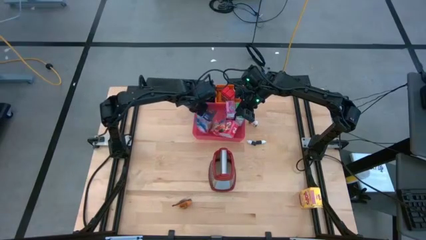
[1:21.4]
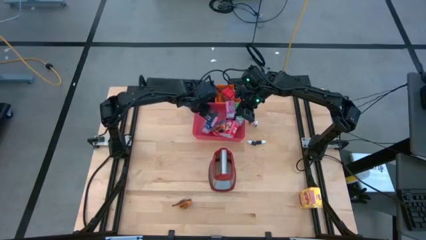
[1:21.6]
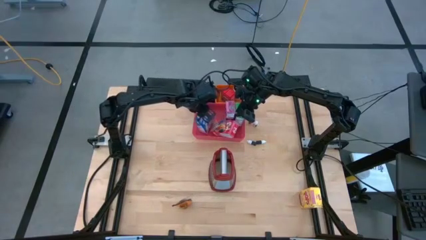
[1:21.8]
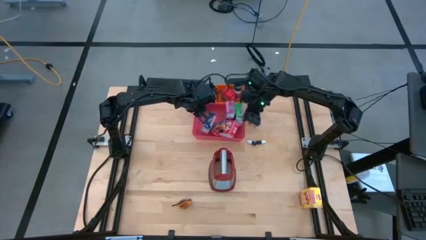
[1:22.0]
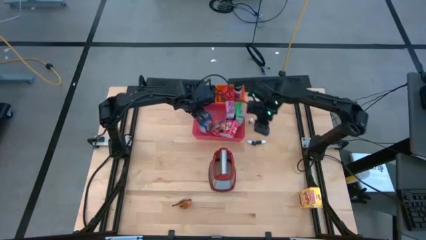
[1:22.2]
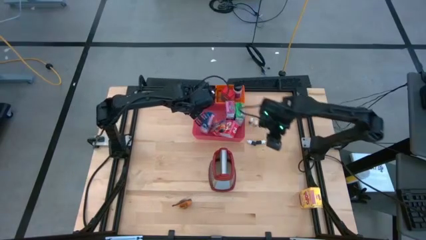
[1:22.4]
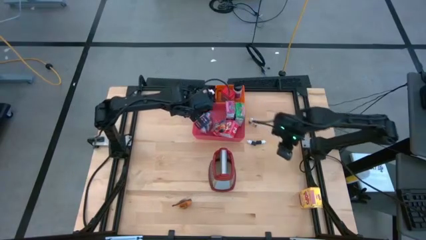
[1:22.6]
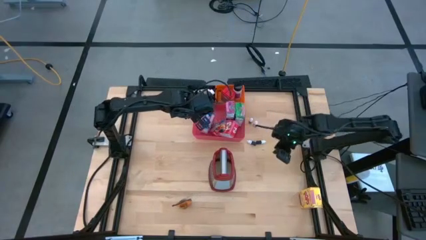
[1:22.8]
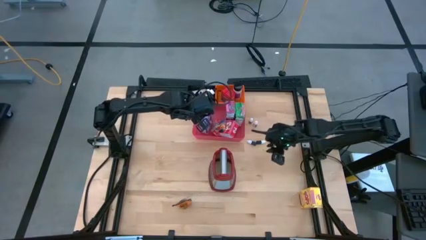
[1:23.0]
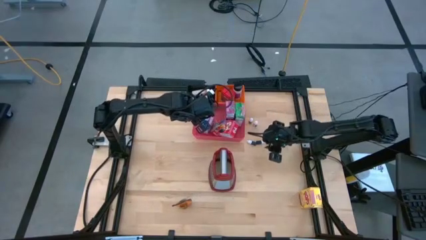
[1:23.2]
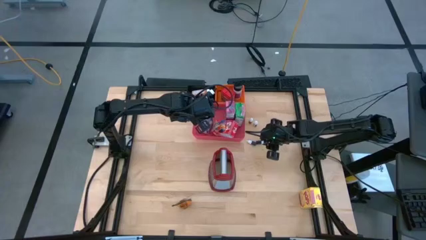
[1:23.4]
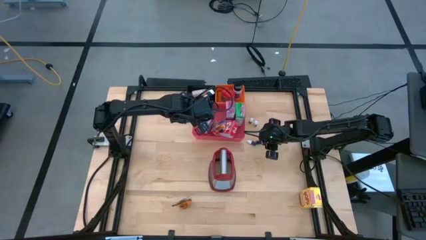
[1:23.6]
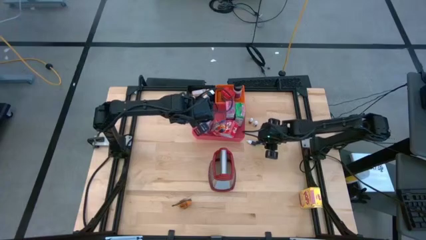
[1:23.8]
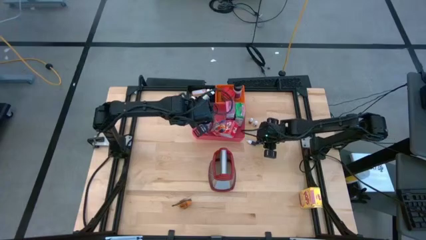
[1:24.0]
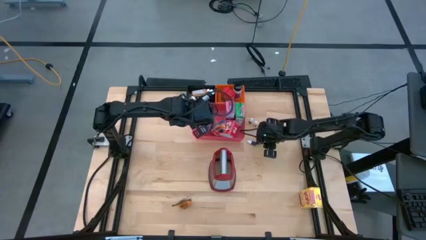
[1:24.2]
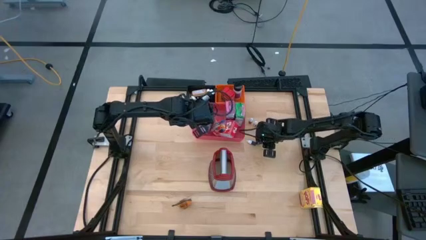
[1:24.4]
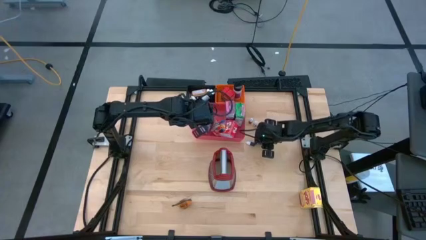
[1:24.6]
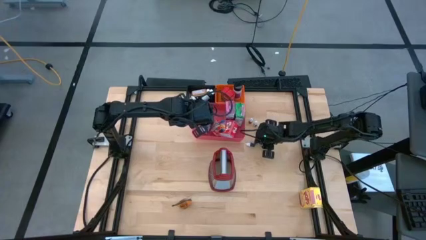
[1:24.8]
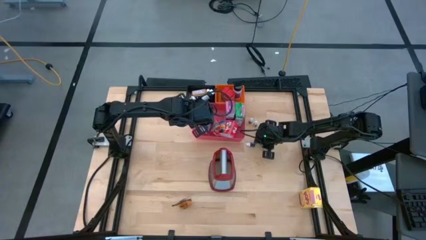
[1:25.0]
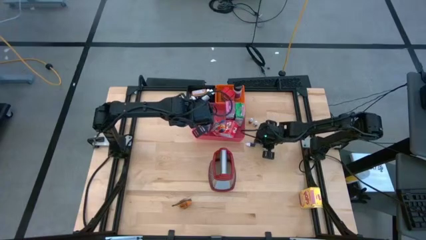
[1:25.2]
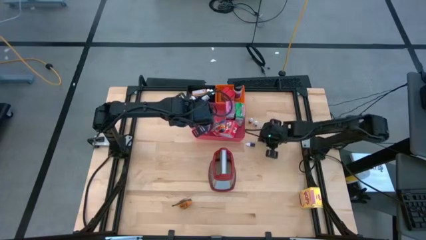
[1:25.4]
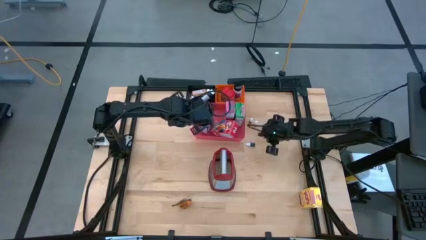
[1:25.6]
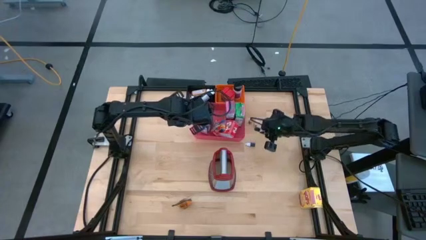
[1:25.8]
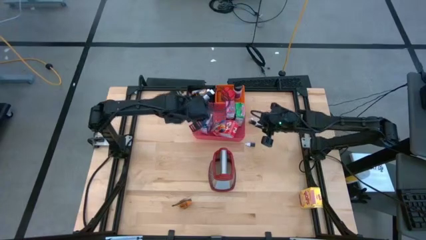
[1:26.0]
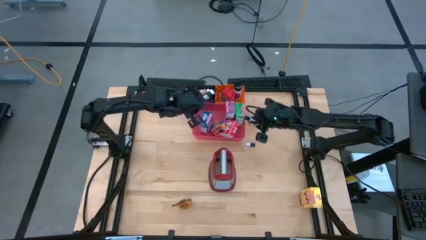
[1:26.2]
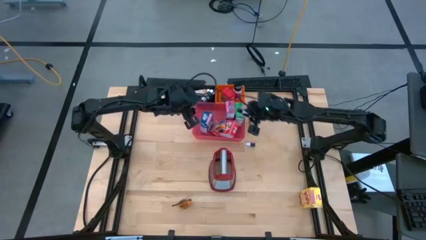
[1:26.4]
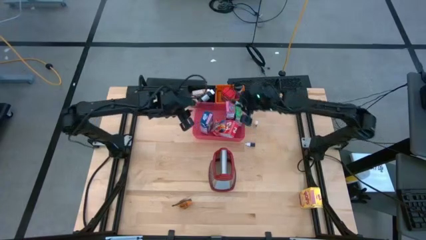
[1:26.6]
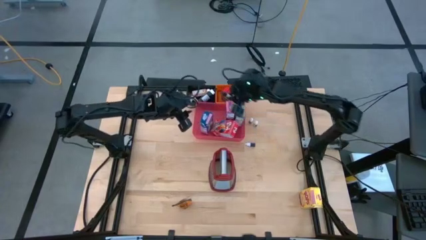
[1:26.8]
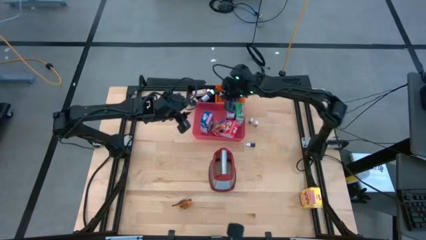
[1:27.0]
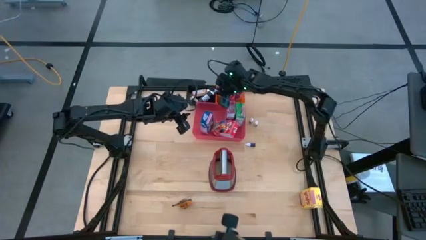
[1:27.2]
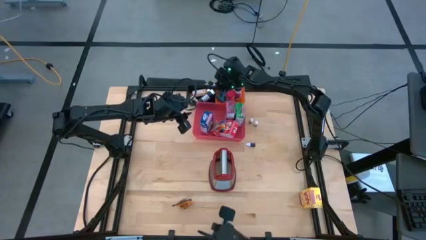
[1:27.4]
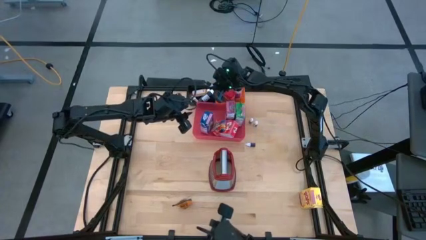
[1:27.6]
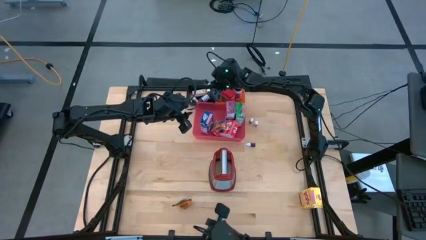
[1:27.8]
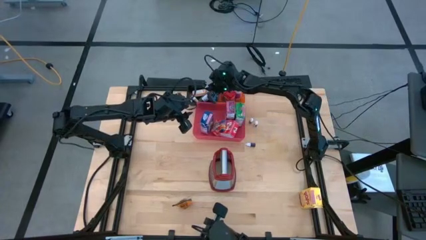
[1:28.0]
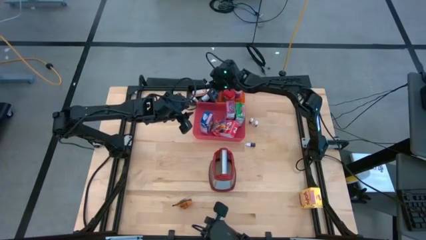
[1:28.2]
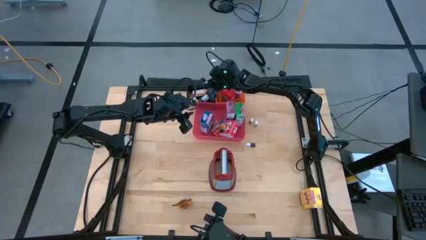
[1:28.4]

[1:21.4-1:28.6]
Task: Pick & Place Kitchen Items
Put the small green food coloring bottle into black basket

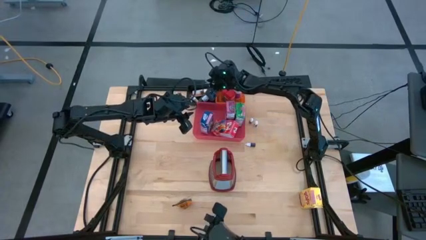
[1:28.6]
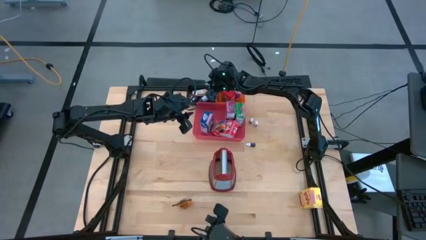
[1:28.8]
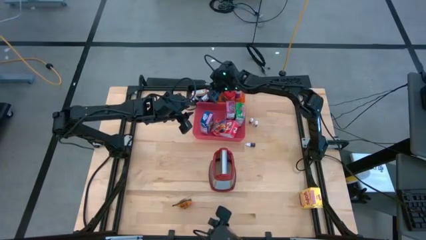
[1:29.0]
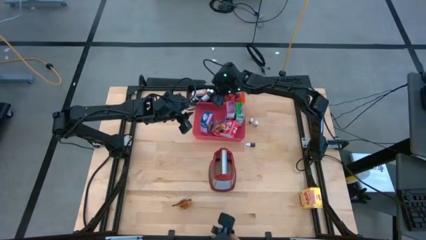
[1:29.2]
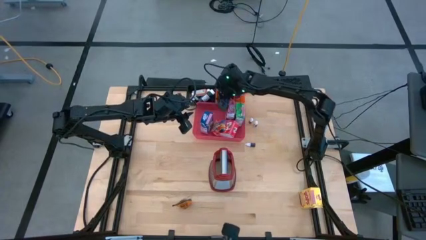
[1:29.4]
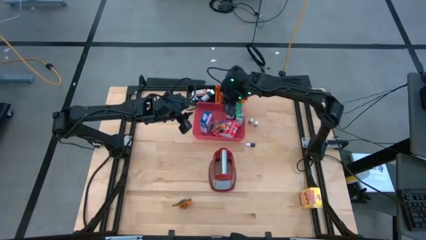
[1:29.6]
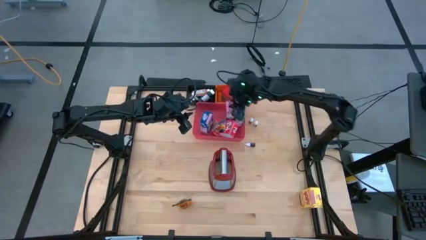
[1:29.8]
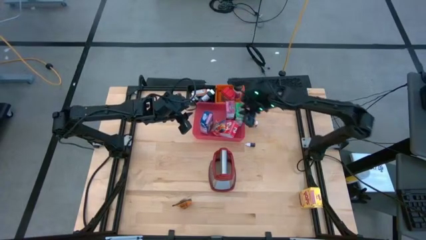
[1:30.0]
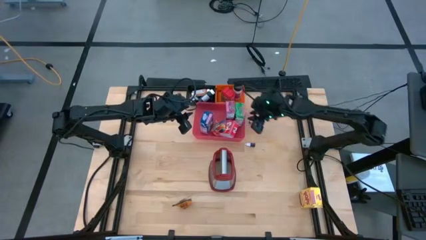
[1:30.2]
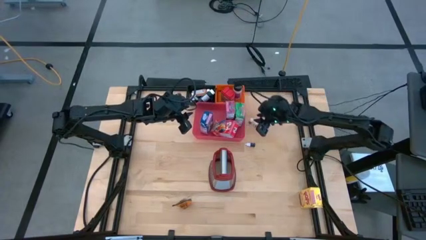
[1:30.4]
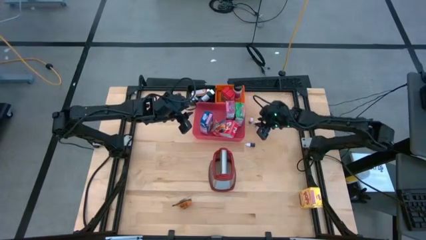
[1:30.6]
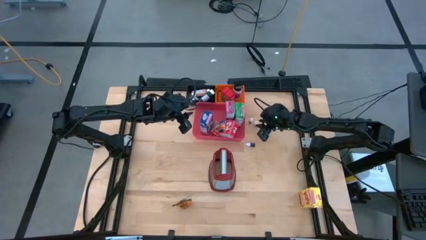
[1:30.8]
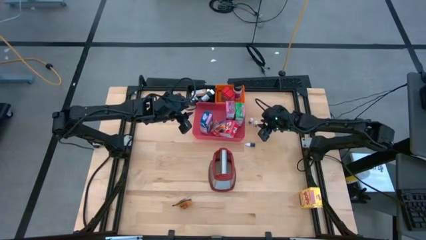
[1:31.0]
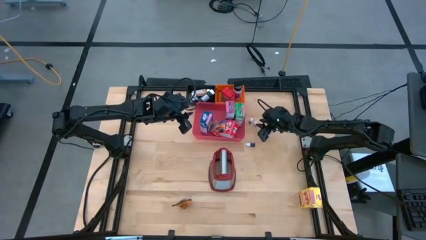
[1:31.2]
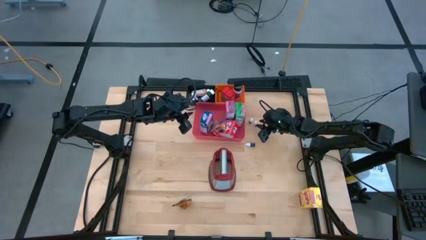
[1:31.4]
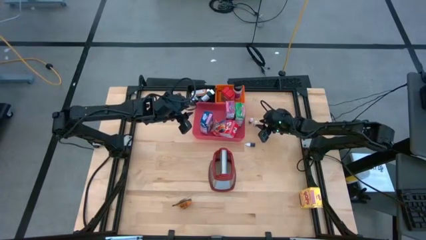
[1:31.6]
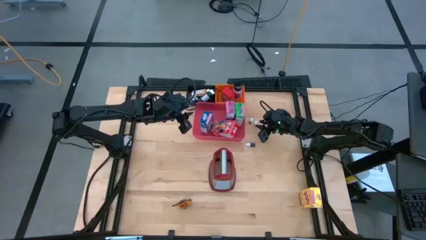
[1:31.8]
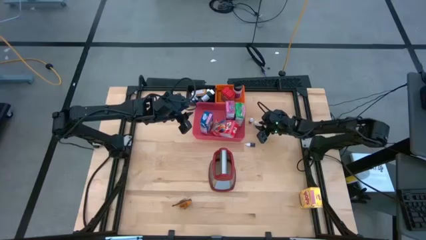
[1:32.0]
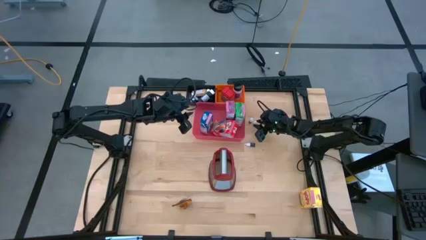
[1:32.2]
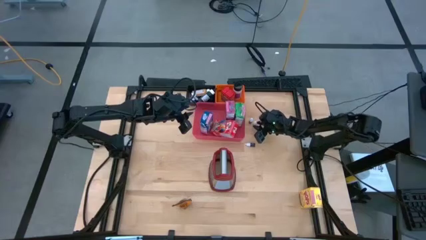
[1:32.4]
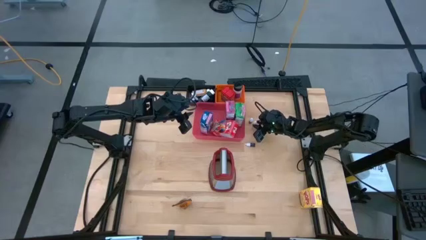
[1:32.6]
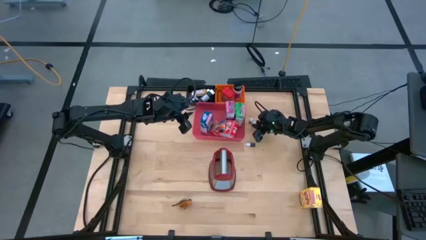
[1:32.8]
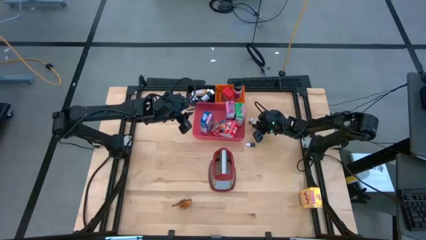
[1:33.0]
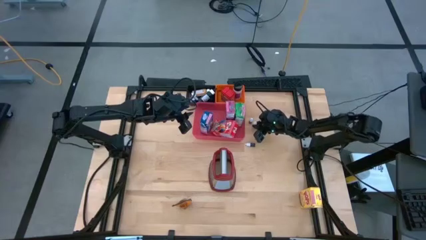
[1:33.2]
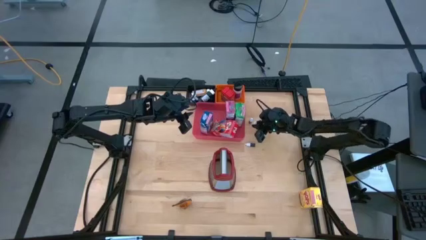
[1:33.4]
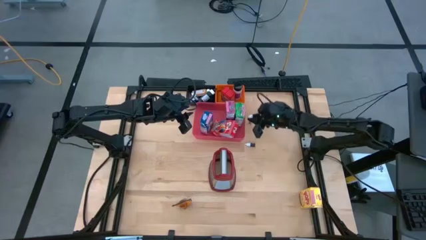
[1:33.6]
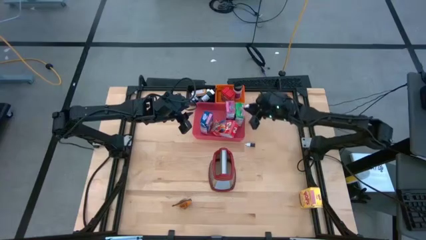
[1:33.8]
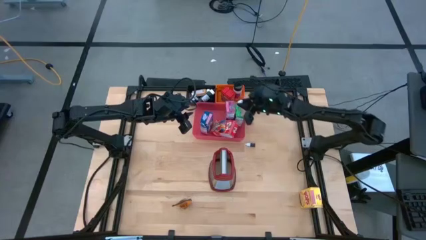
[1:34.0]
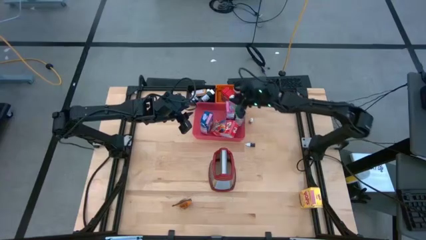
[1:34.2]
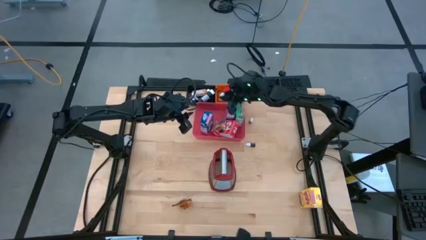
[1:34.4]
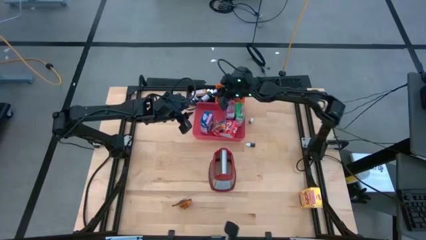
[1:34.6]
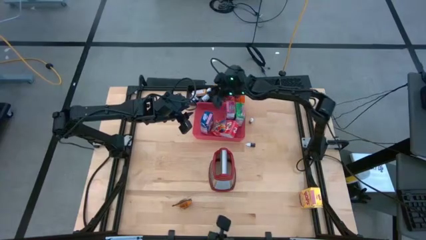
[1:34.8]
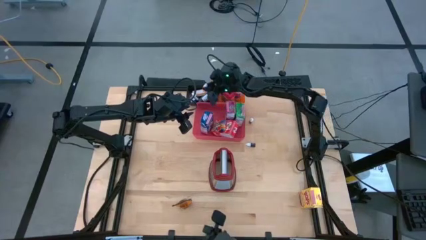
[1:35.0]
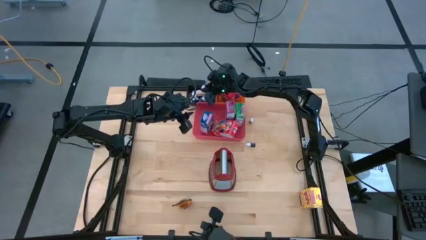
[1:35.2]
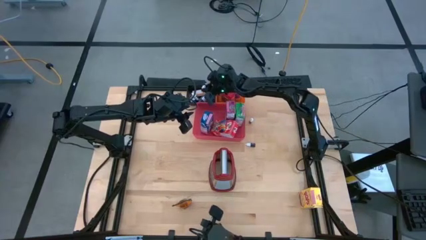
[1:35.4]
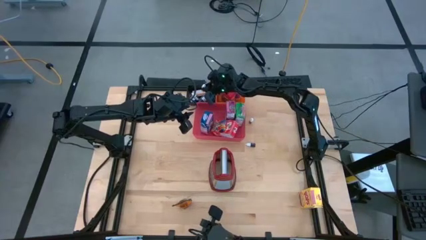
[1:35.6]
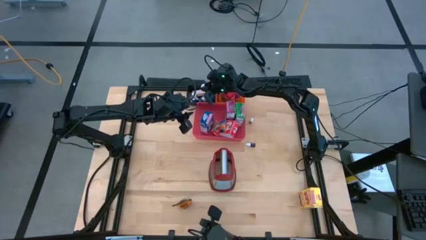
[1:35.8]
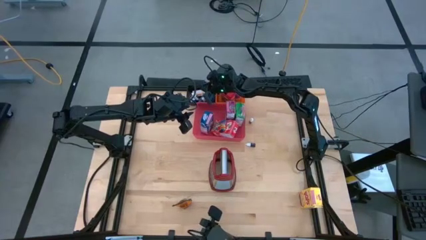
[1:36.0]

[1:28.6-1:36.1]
Put the small orange food coloring bottle into black basket

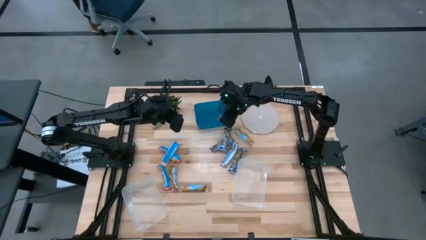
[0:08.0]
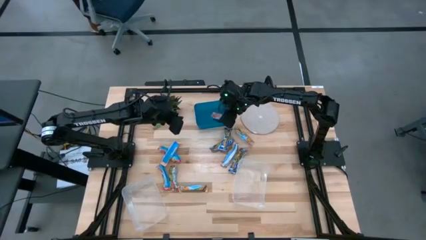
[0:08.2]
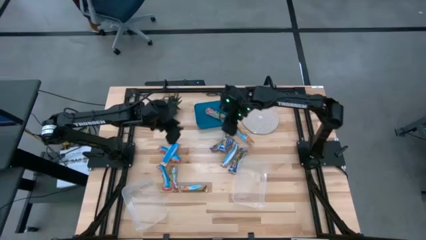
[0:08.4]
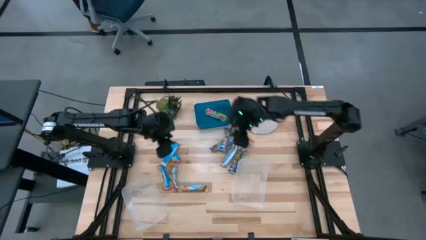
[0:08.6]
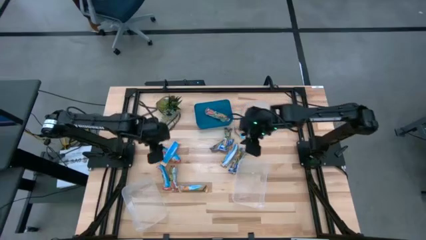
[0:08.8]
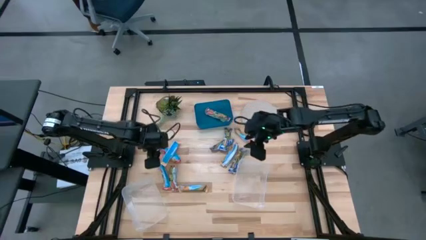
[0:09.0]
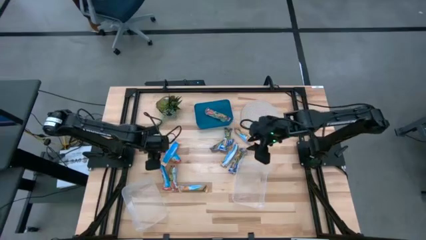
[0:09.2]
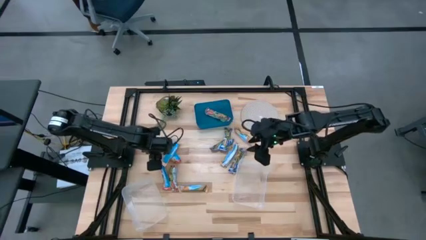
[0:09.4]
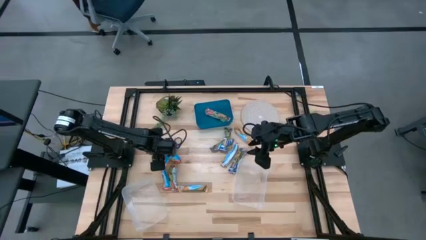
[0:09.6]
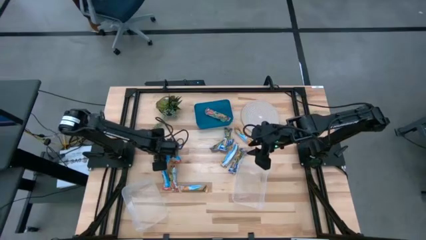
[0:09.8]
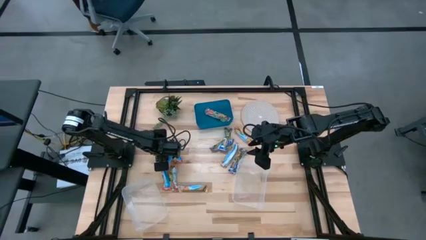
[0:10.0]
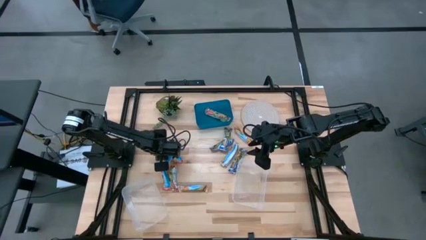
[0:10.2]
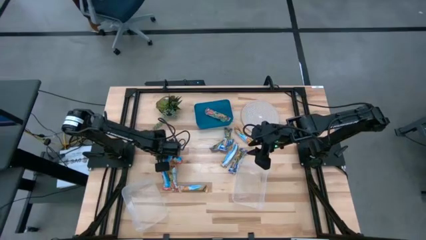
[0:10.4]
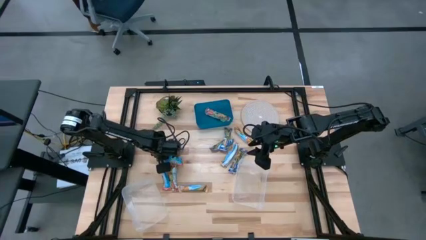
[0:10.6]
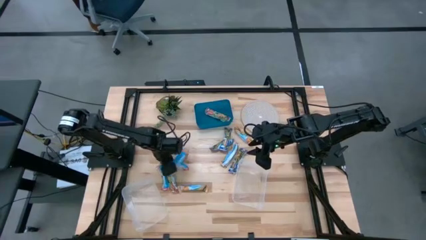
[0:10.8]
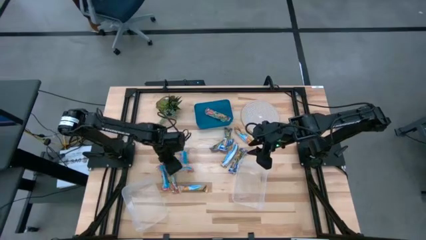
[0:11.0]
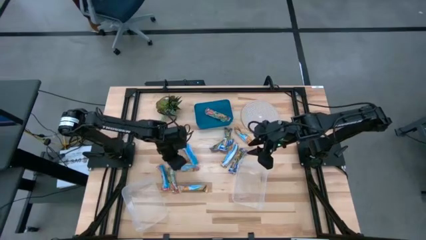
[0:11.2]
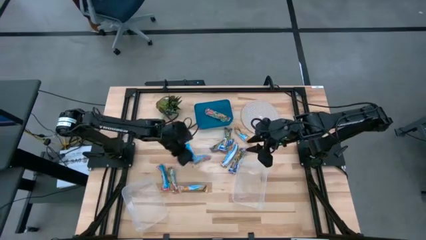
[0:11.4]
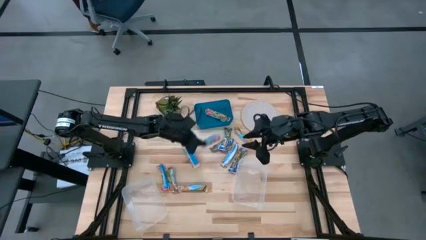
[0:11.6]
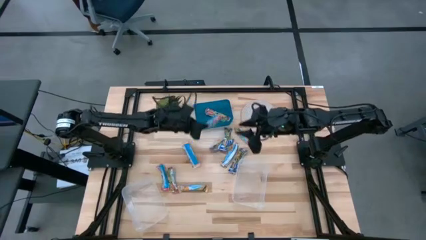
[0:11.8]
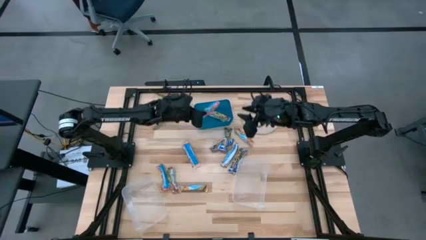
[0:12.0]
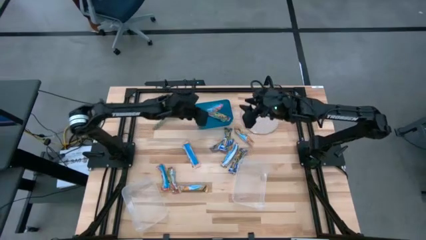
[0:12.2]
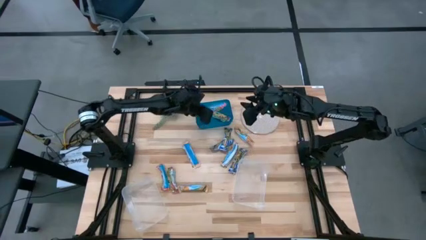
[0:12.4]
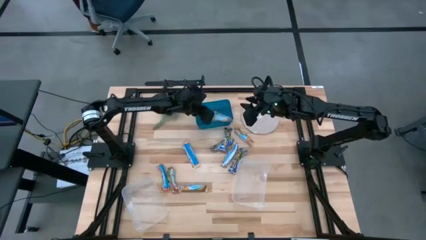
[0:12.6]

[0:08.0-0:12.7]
Task: Pick and place Granola Bars by type
Put the red granola bar into the blue bin
